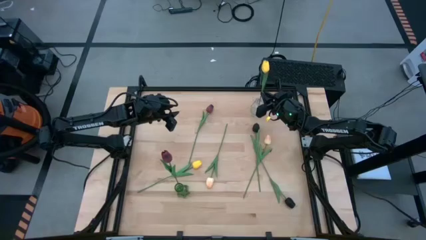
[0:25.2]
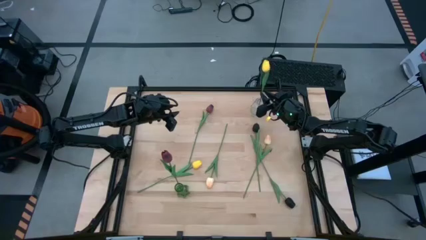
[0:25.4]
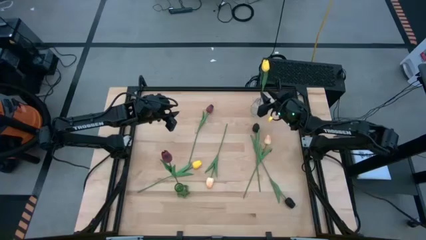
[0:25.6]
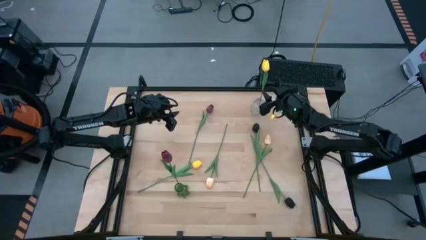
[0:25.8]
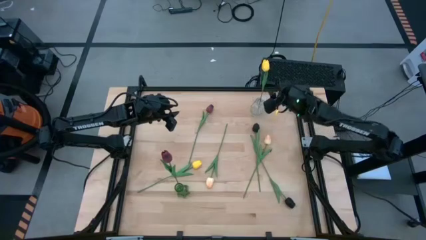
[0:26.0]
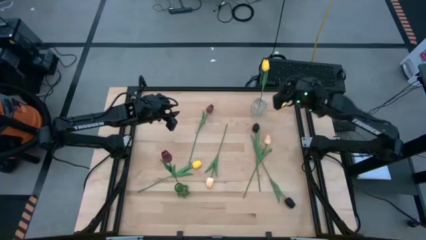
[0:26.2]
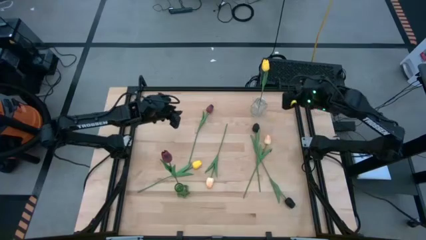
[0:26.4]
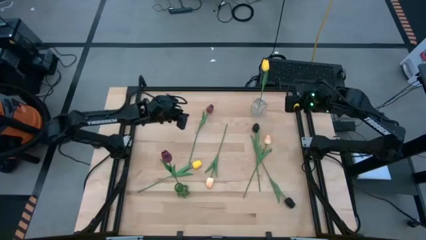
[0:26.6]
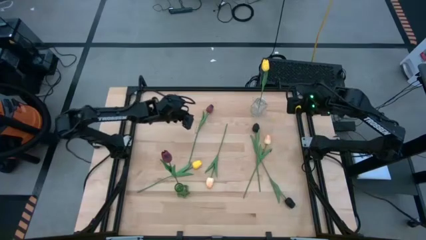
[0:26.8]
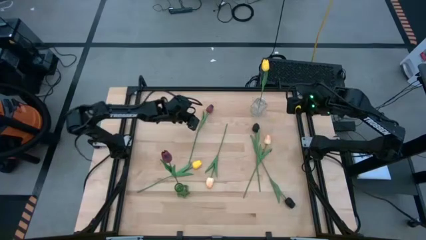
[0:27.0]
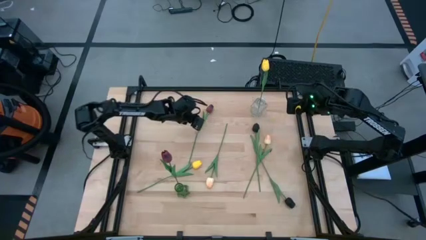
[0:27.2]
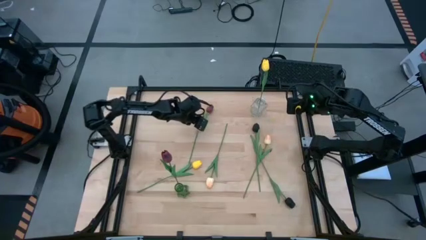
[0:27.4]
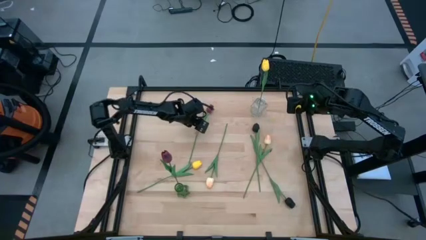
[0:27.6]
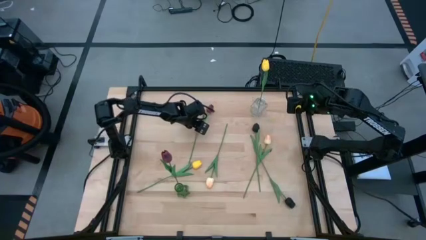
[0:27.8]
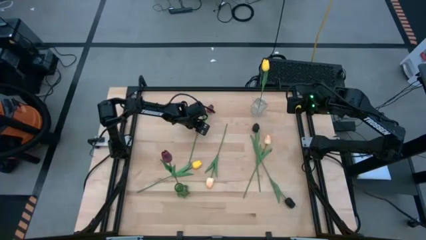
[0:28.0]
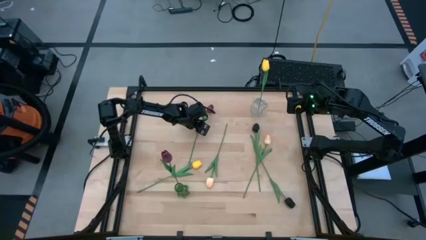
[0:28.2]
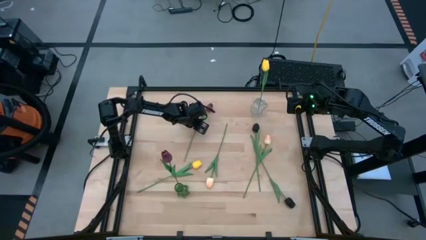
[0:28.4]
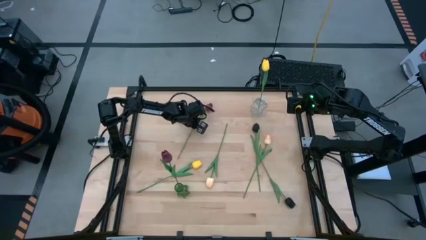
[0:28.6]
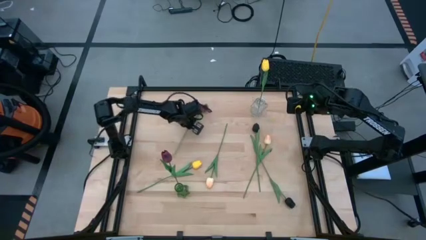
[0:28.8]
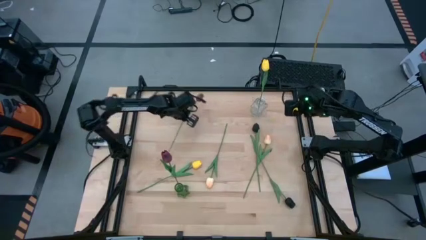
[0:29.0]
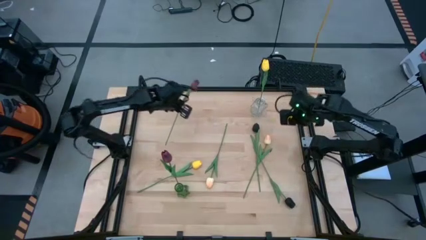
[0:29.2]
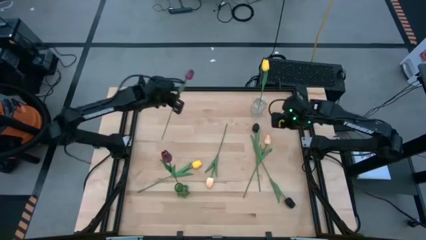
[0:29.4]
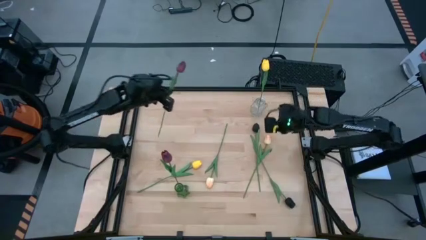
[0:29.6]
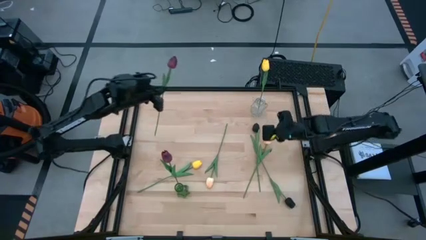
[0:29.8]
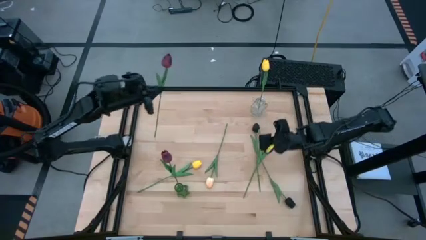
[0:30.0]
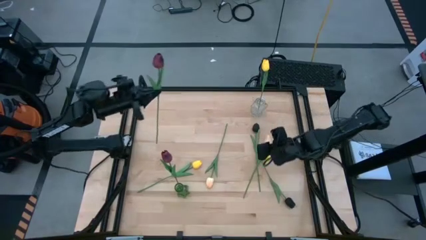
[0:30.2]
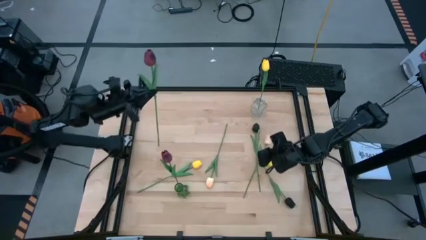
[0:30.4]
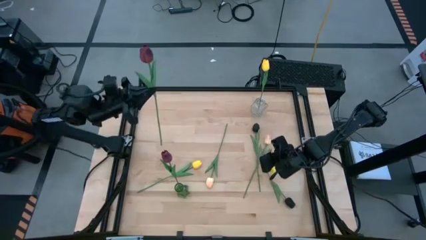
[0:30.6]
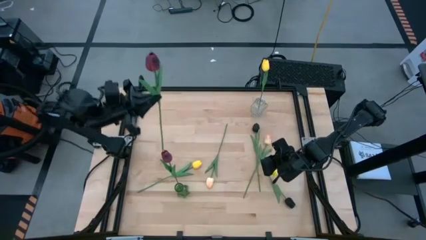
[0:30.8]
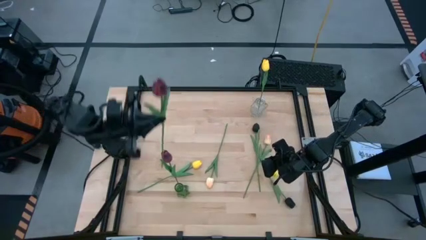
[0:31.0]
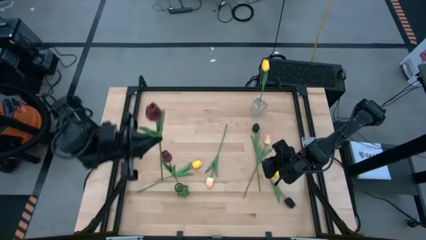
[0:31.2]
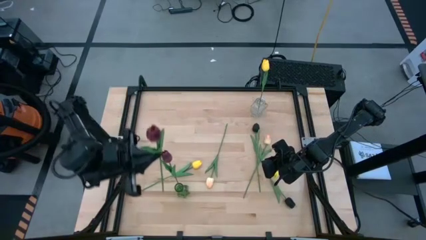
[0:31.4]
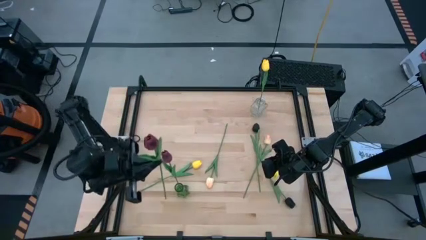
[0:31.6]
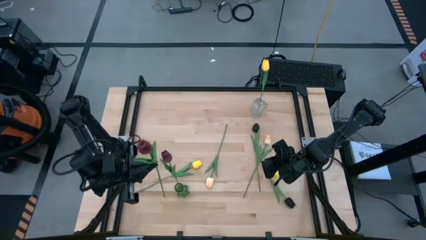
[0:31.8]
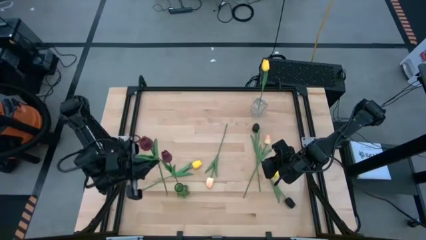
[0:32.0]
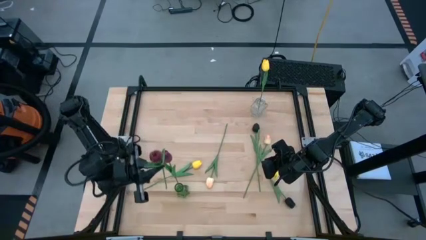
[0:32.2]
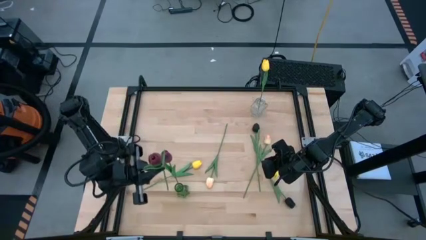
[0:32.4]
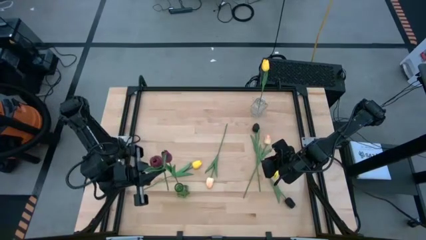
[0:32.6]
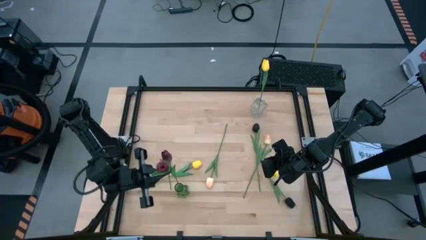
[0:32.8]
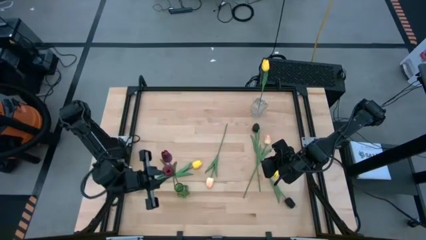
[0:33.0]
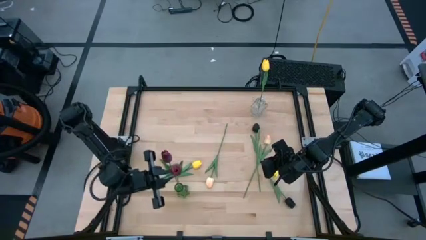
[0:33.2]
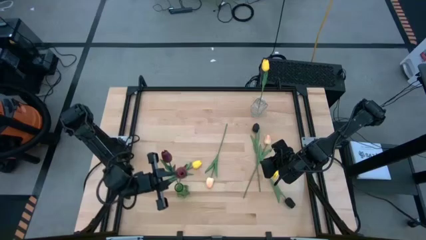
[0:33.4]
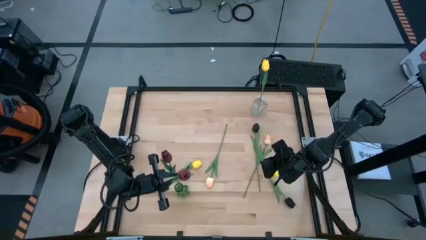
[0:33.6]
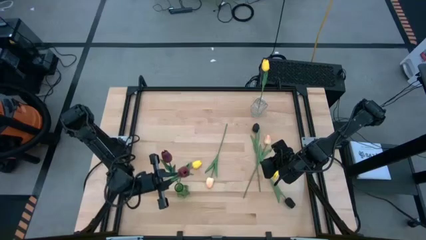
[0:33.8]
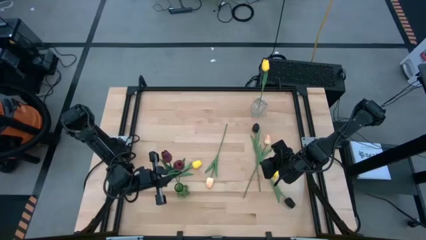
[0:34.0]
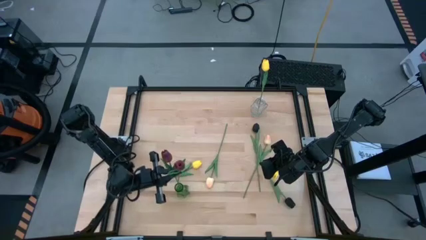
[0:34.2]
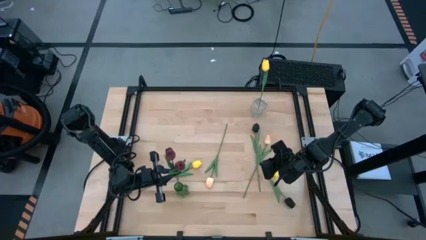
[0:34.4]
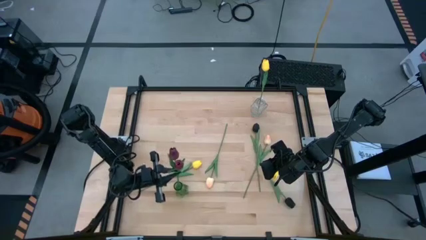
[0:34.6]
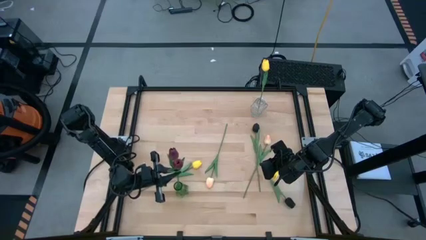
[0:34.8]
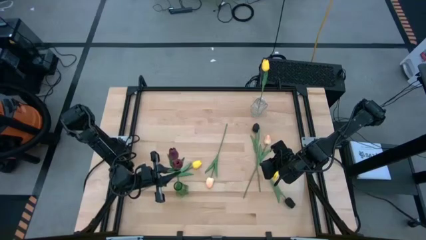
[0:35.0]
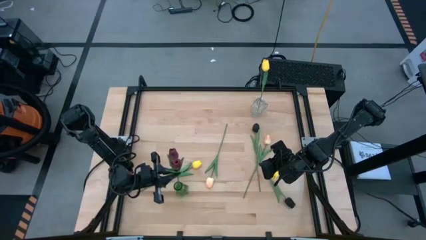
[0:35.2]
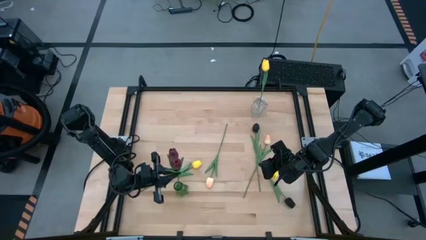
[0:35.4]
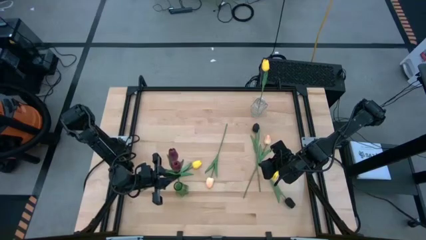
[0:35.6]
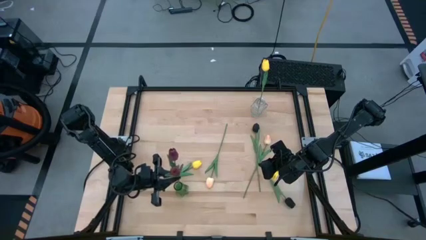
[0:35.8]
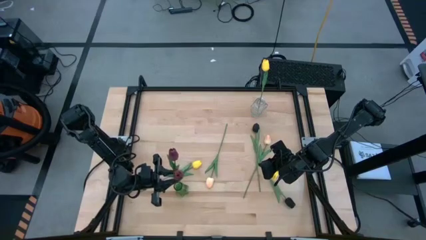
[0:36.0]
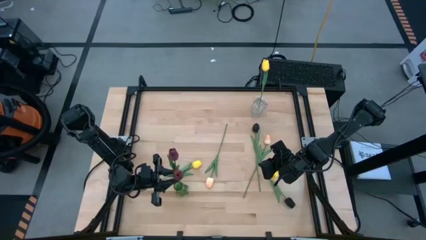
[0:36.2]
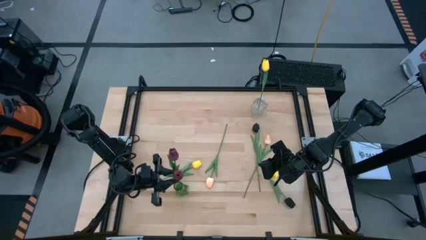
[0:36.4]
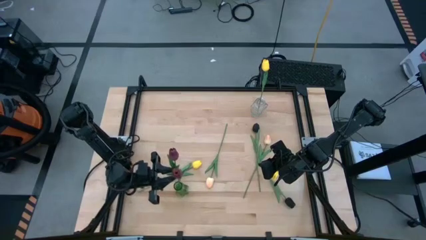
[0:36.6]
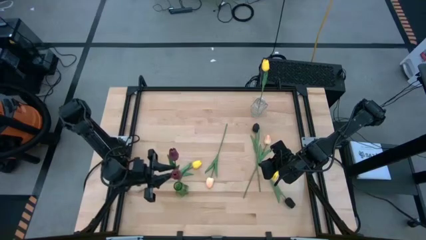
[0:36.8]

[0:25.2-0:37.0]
Task: Sort flowers into vase by color
Put the dark red flower into the green vase
